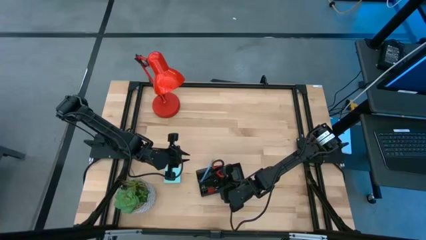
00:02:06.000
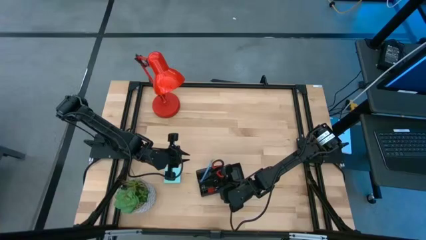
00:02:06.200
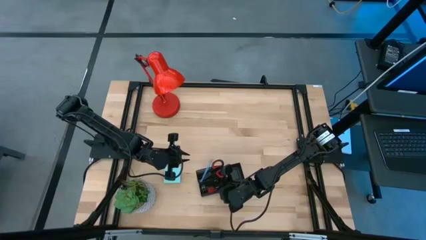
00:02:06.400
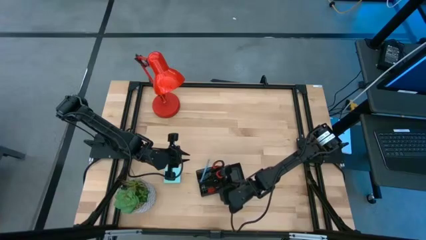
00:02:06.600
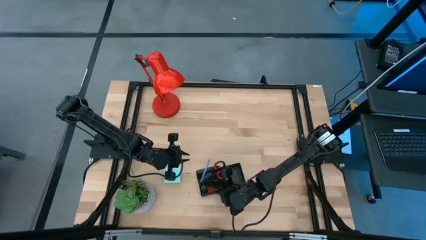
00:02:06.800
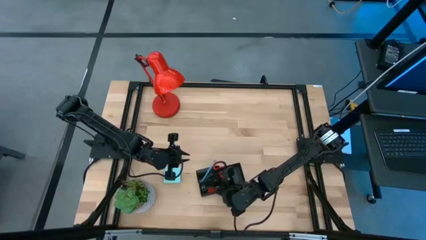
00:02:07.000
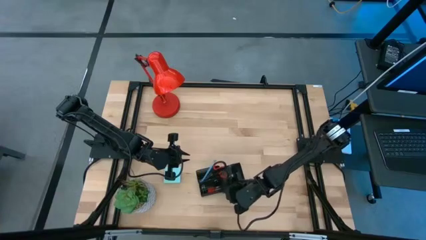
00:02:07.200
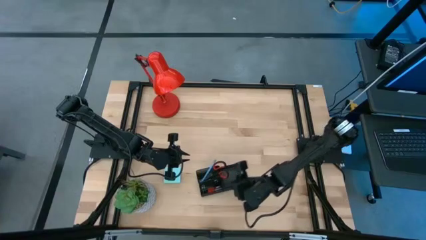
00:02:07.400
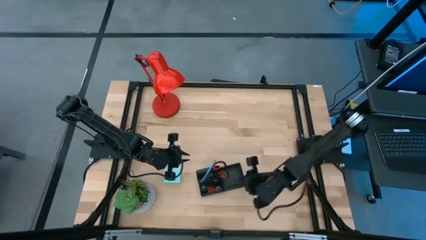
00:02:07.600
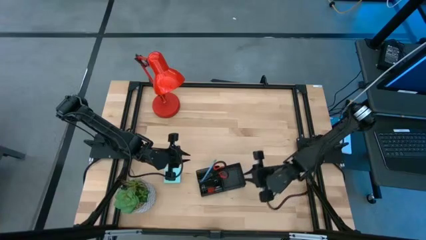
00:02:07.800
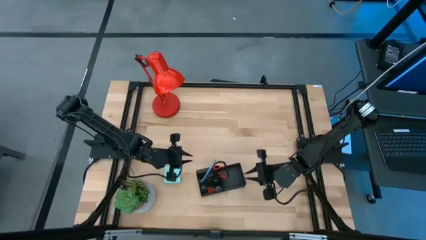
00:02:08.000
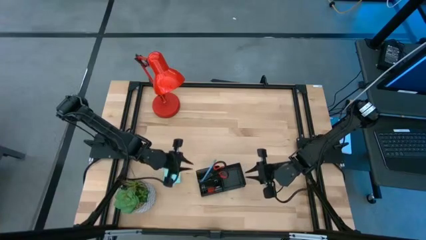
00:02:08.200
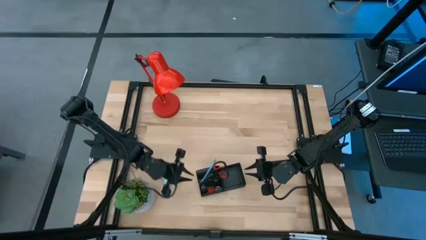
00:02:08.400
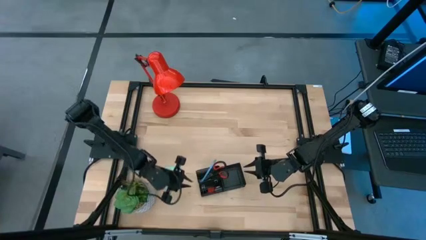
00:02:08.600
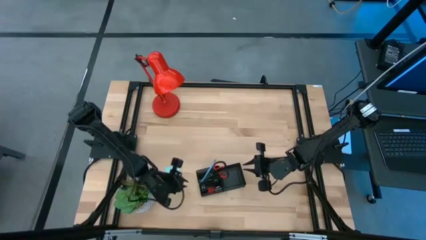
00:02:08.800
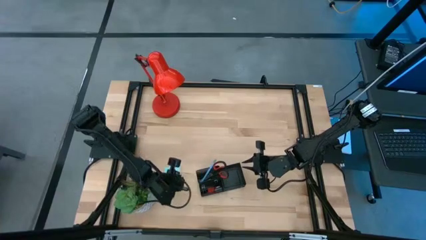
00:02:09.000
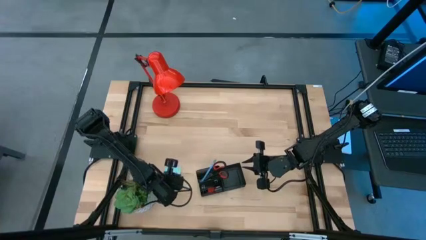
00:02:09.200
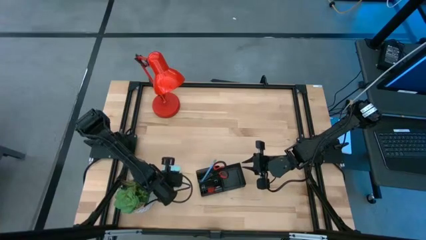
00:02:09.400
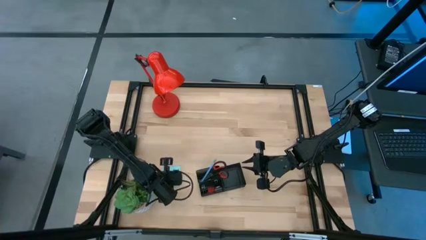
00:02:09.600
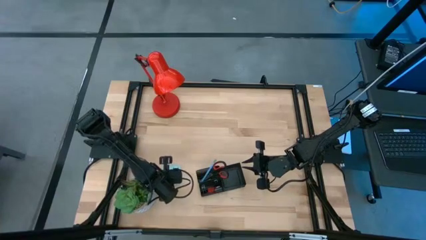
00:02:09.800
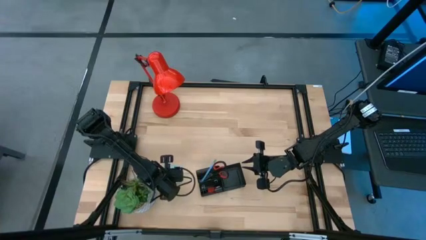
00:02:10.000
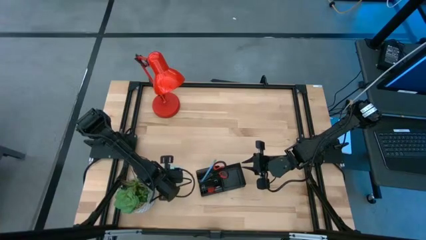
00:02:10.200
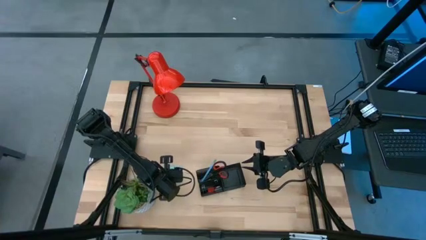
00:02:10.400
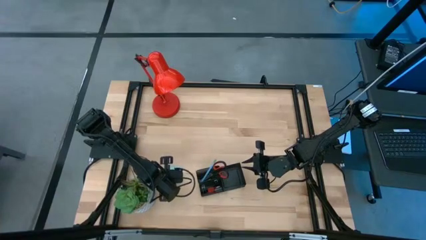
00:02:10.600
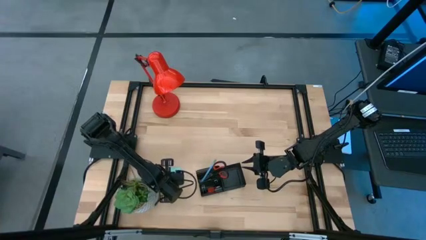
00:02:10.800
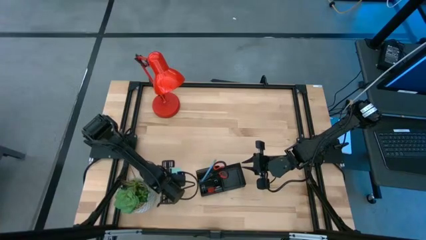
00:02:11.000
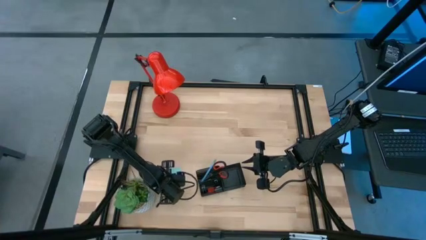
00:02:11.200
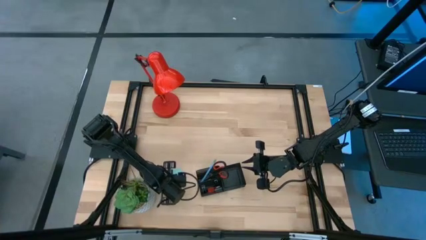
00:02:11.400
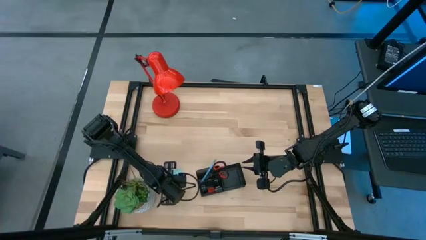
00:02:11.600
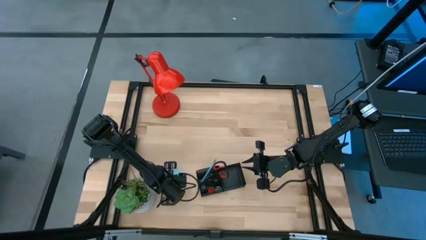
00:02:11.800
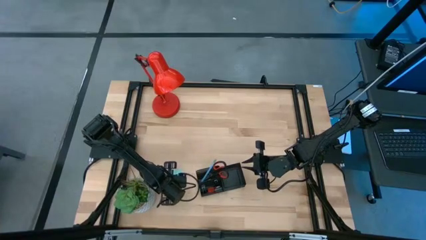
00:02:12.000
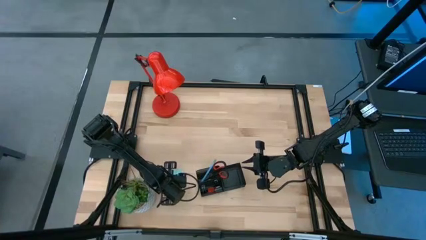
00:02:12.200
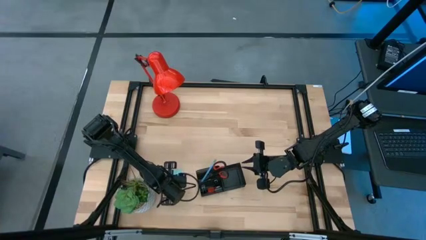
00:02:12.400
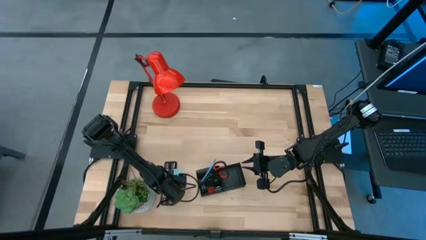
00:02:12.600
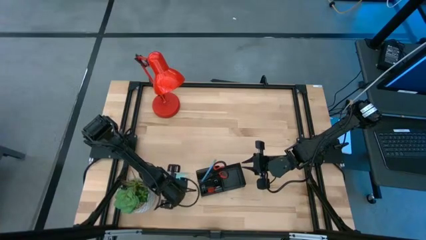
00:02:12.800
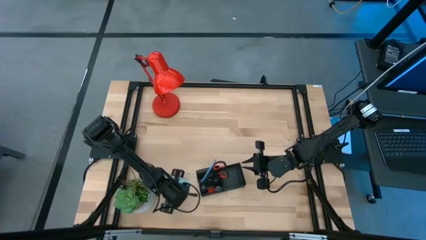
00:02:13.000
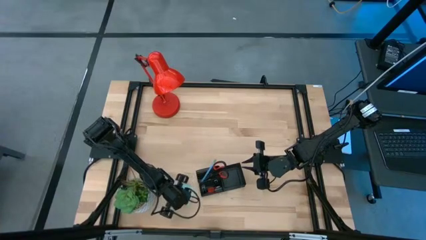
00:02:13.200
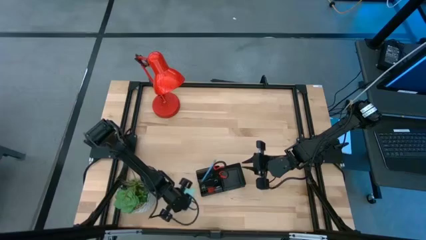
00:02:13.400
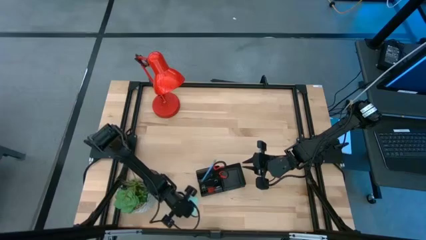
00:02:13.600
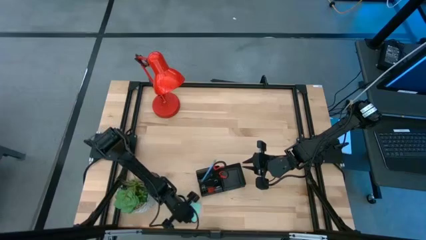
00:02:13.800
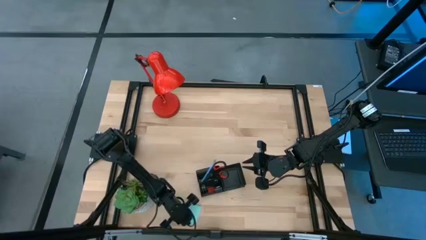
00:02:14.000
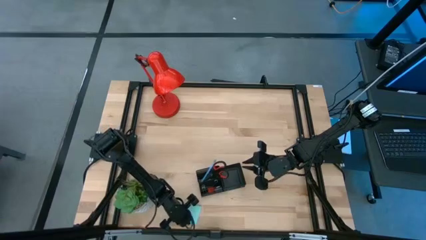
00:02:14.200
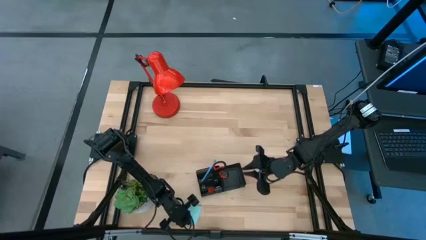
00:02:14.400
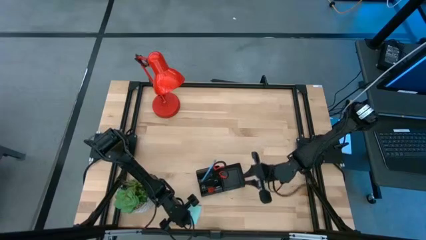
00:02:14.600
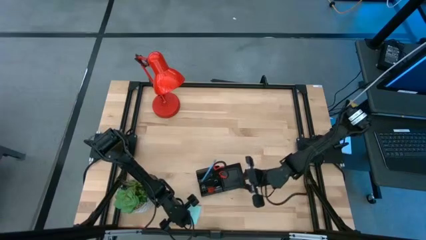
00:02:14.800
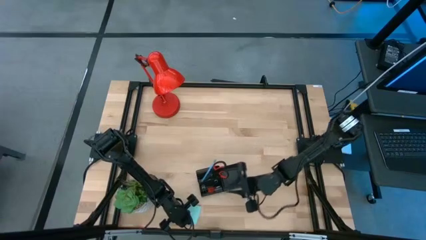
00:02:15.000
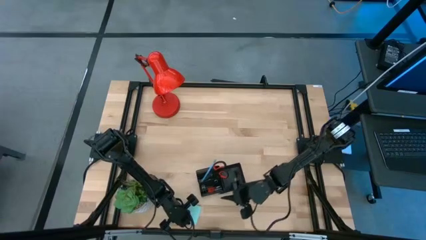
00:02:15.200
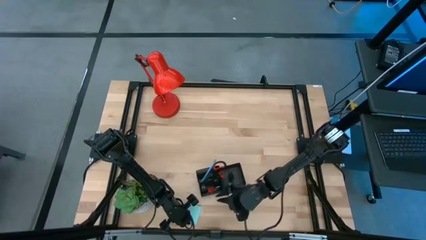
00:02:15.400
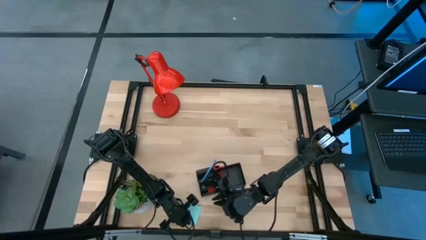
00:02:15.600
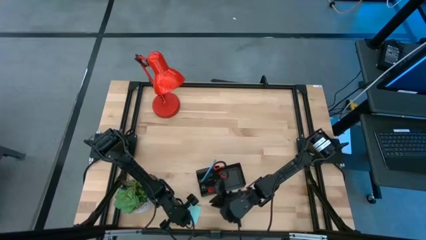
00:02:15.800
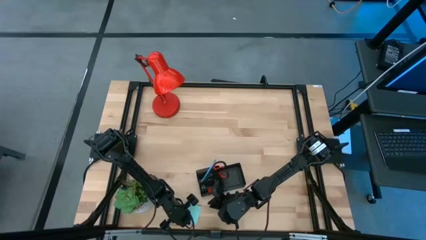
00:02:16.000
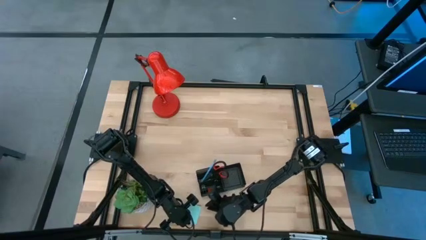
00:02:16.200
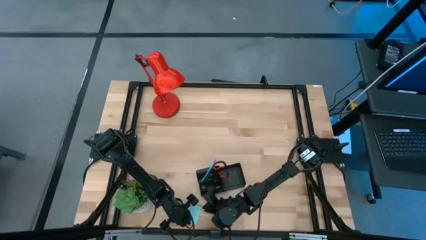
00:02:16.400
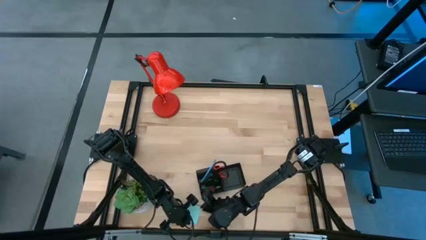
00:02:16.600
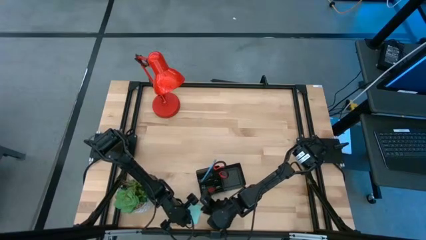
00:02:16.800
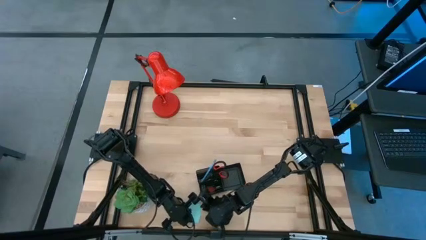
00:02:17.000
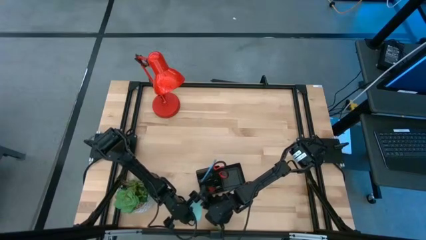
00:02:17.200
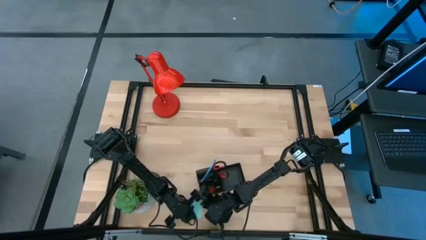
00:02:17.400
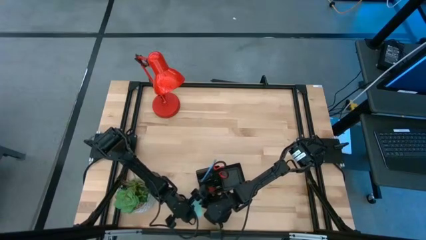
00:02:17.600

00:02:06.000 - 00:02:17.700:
Task: Pick and place office supplies into organizer
Put the blue sticky notes into the black desk organizer

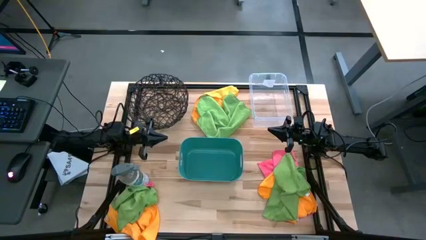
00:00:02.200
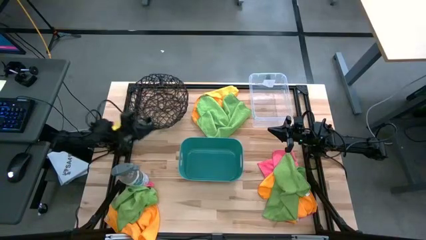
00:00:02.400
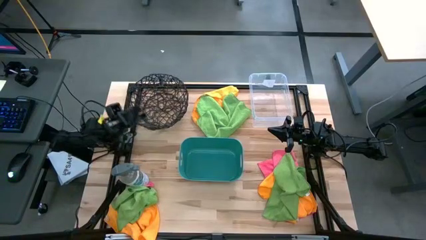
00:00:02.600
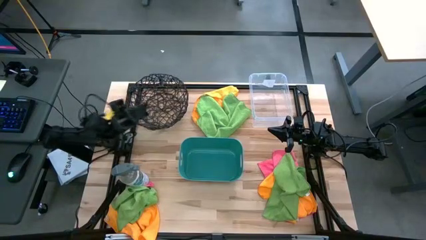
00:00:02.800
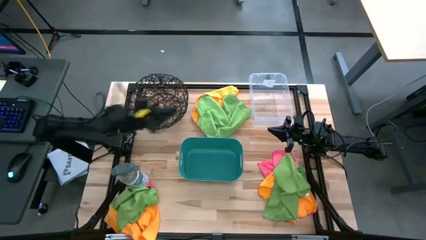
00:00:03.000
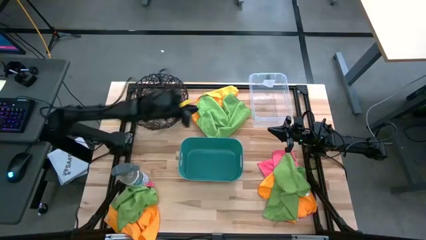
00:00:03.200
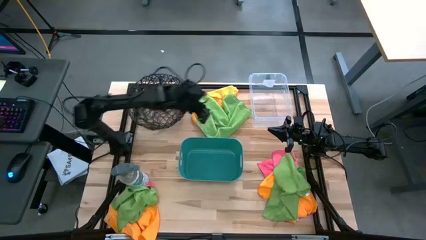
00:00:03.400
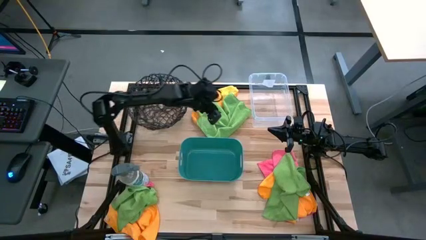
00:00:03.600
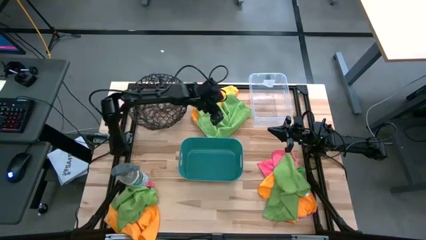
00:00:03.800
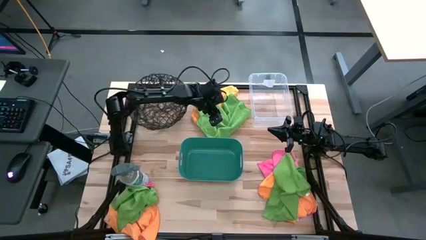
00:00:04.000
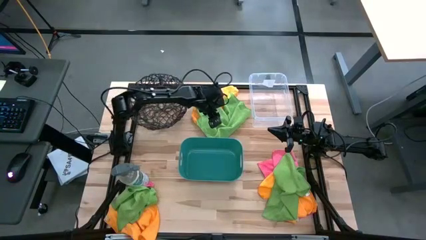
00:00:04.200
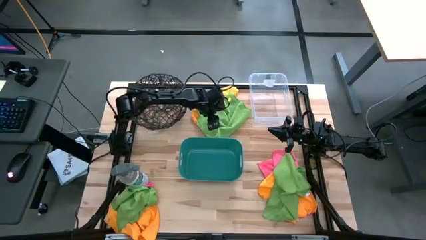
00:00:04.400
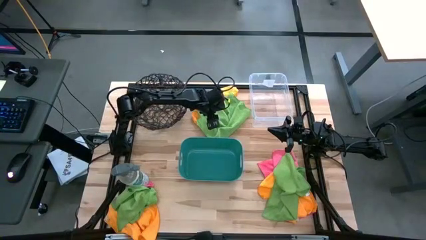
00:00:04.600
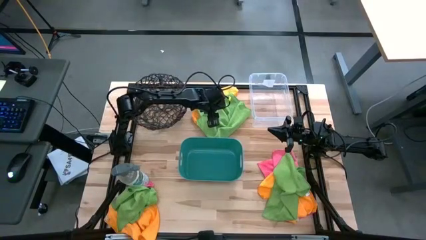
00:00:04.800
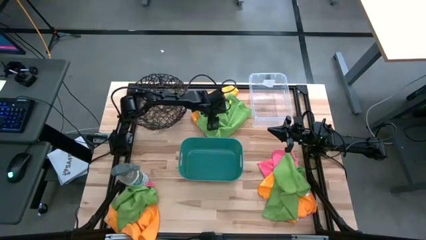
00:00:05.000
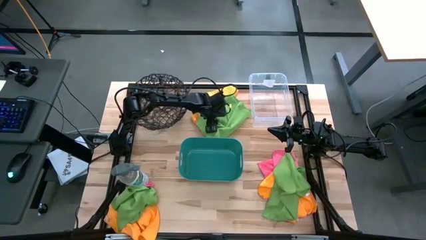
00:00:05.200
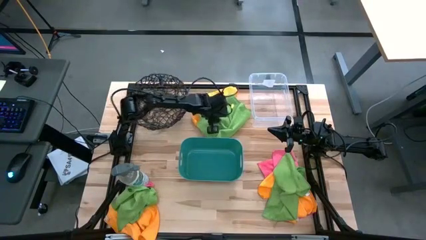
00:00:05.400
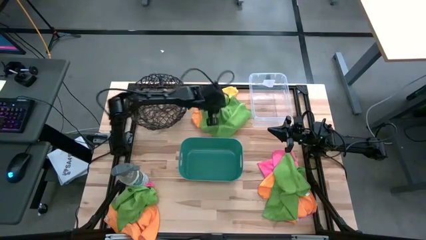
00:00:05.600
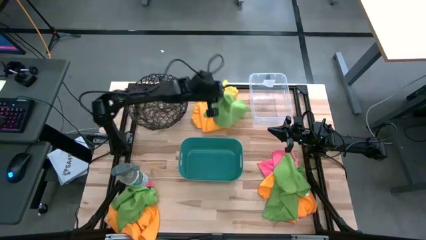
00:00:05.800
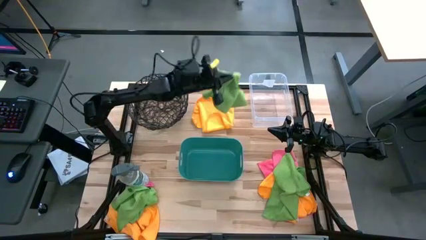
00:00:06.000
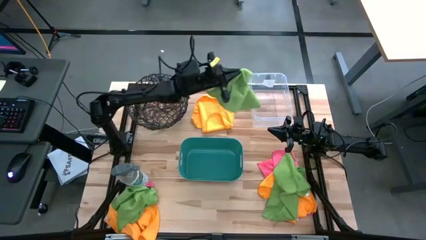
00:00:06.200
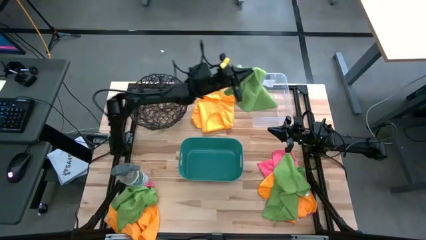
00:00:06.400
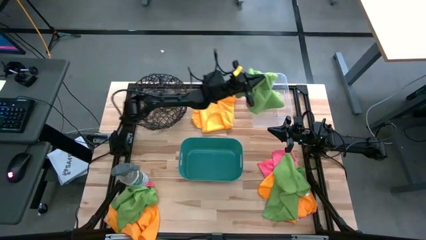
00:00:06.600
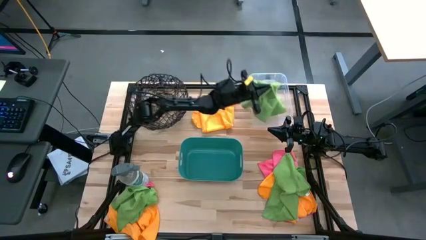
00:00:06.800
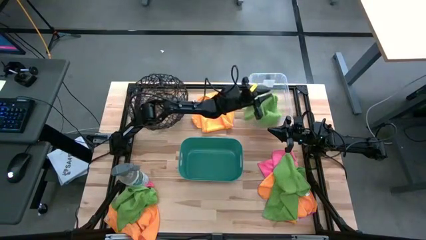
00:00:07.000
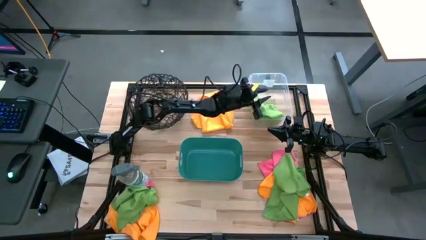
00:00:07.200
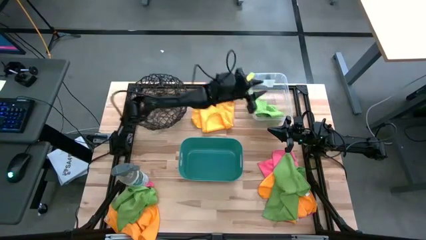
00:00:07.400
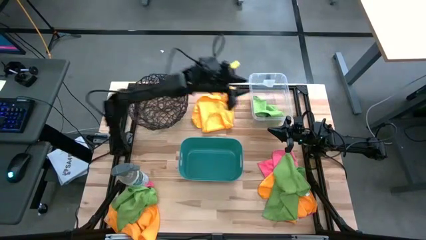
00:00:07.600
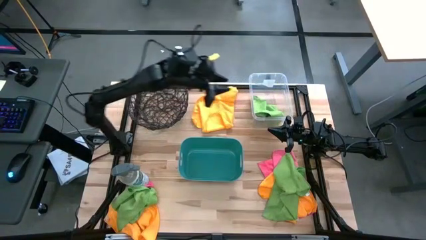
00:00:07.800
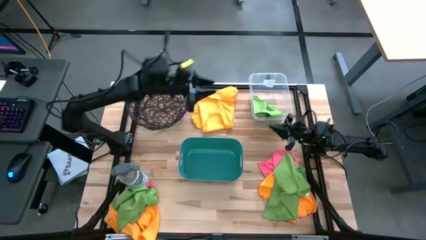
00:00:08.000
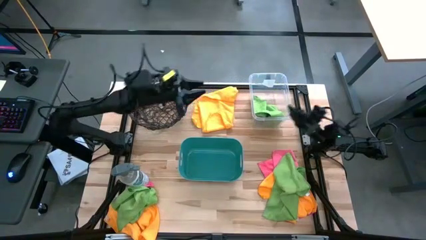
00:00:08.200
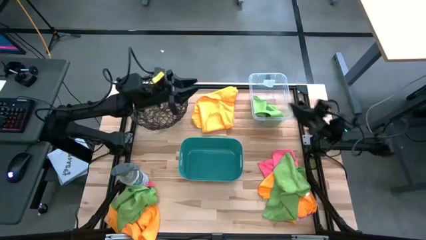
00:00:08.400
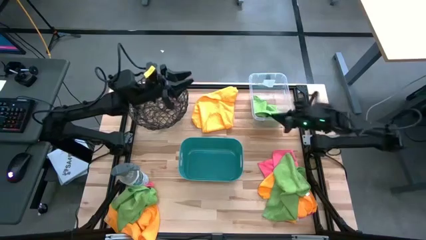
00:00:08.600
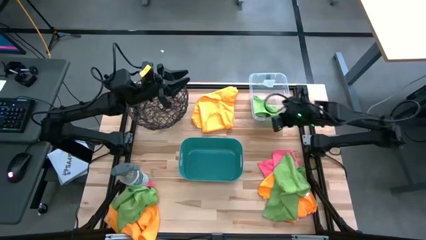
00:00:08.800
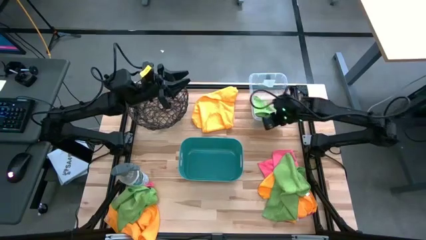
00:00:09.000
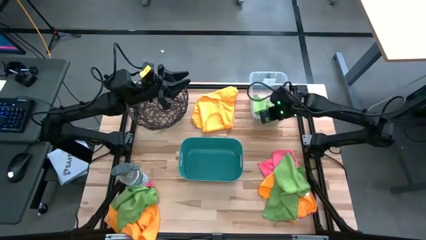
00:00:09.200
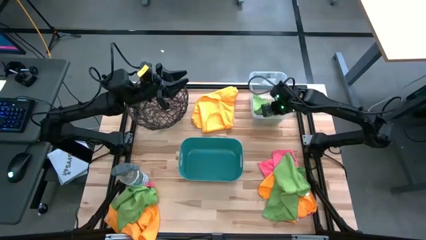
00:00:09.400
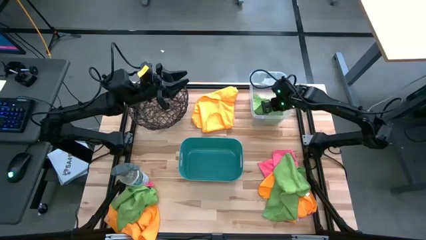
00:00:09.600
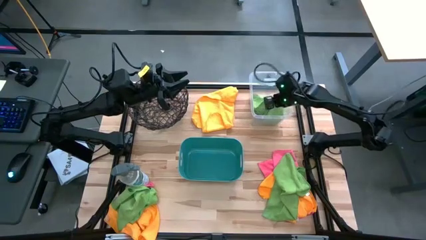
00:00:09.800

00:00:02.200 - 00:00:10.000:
Task: Sort microfiber towel by color & place in baskets
Put the top green microfiber cloth into the transparent bin
